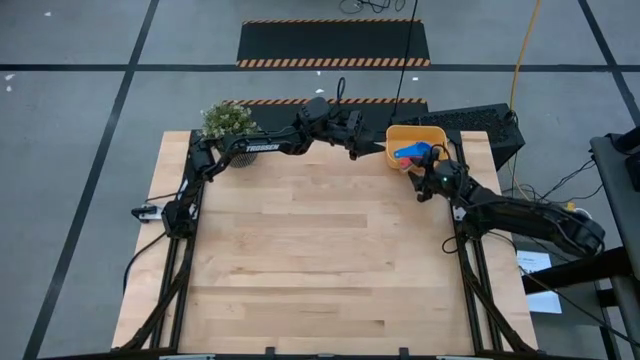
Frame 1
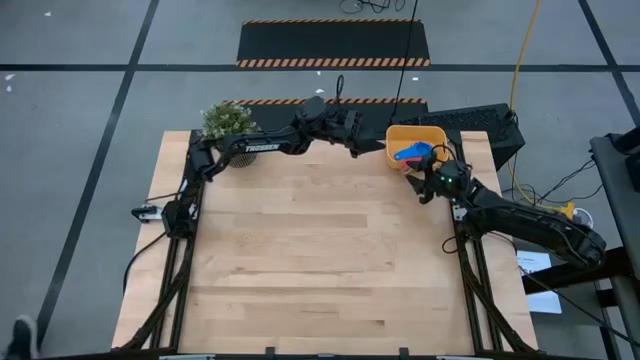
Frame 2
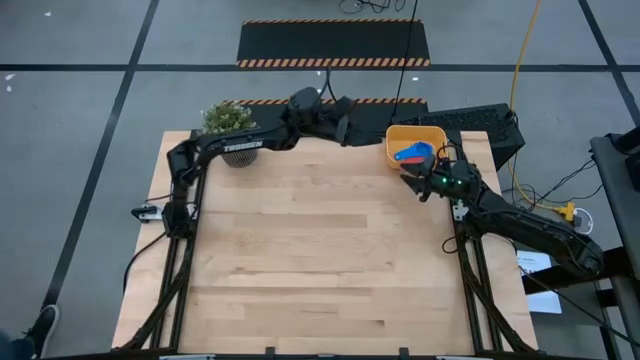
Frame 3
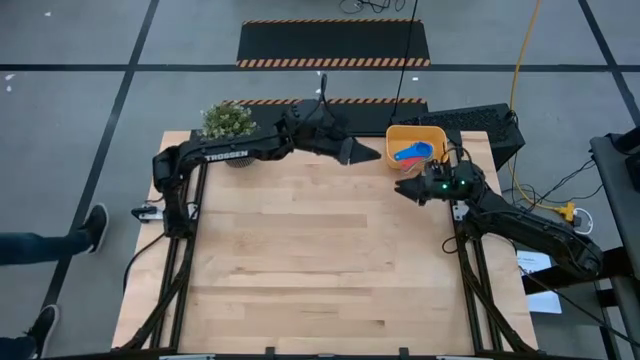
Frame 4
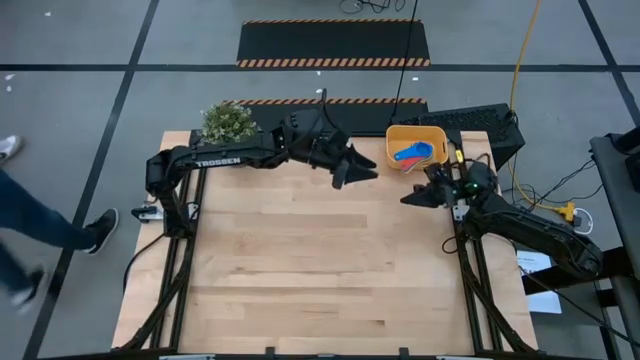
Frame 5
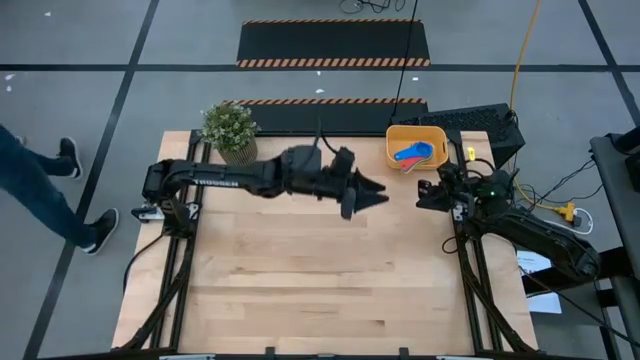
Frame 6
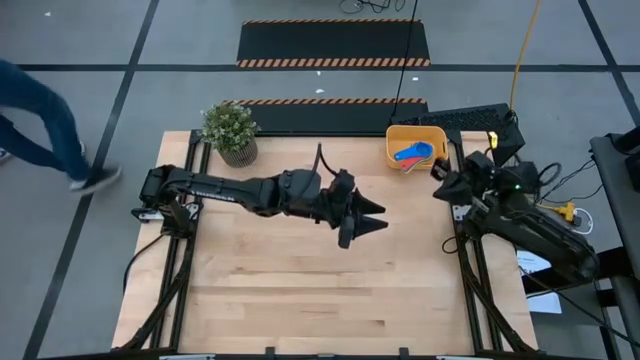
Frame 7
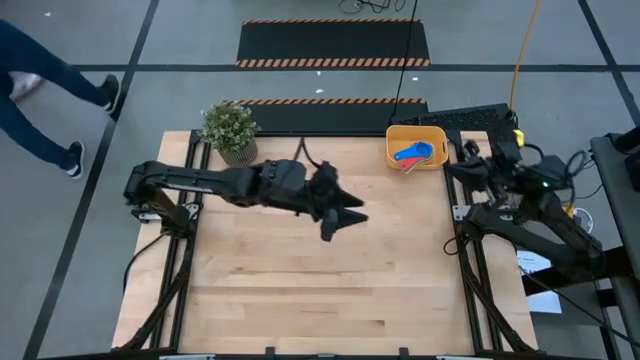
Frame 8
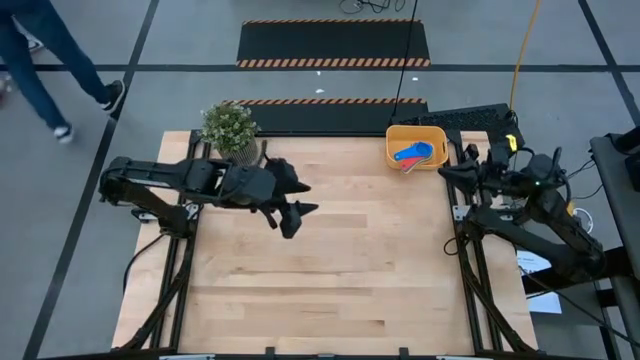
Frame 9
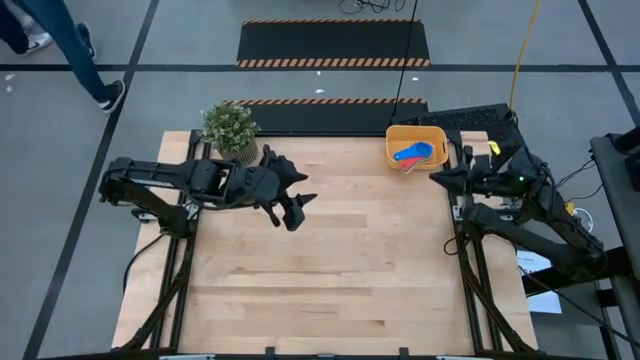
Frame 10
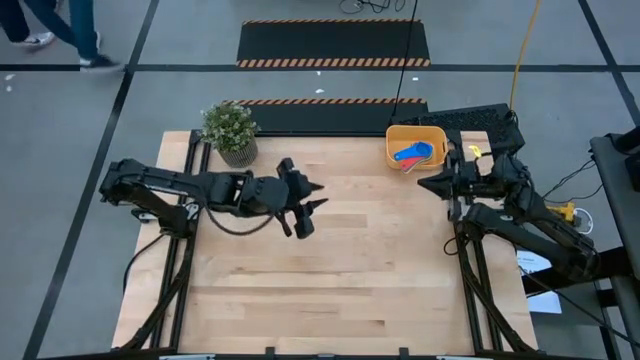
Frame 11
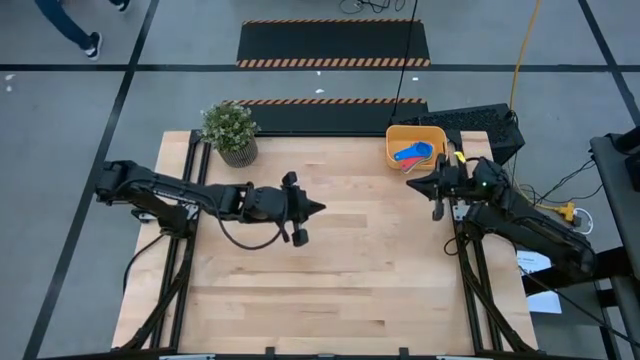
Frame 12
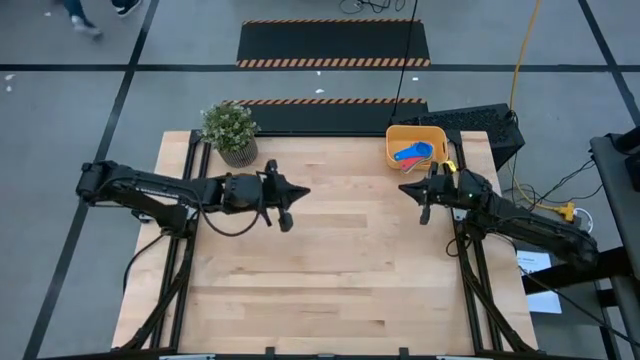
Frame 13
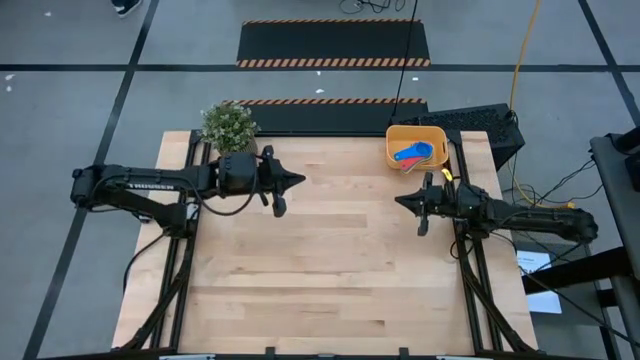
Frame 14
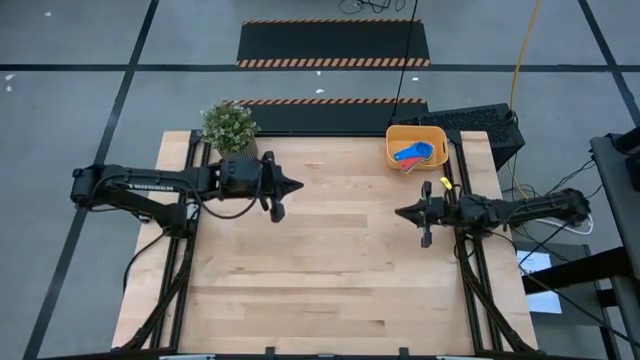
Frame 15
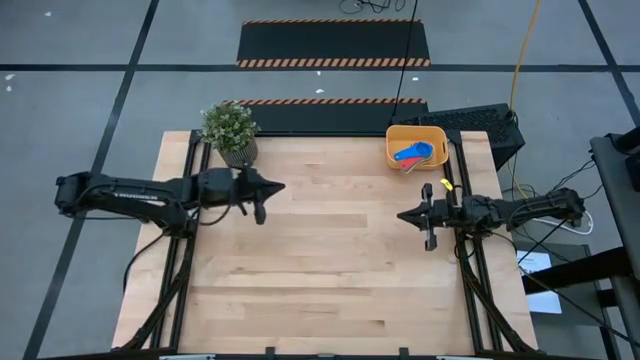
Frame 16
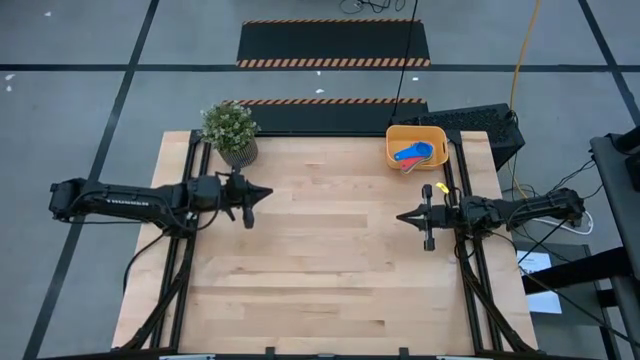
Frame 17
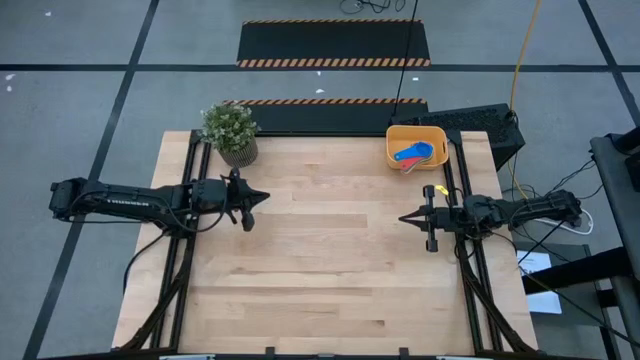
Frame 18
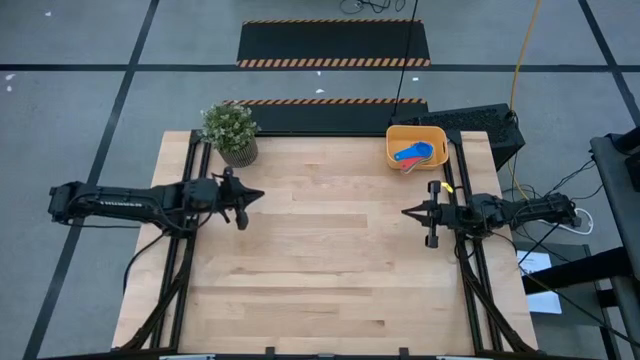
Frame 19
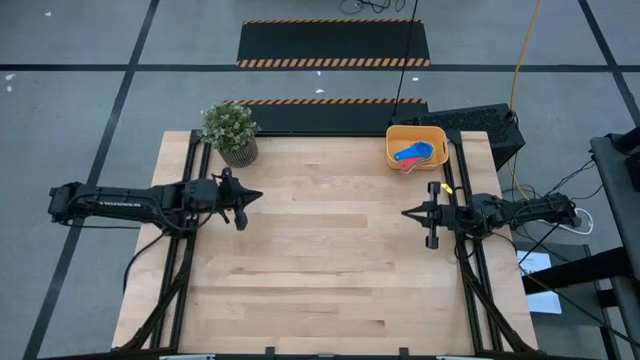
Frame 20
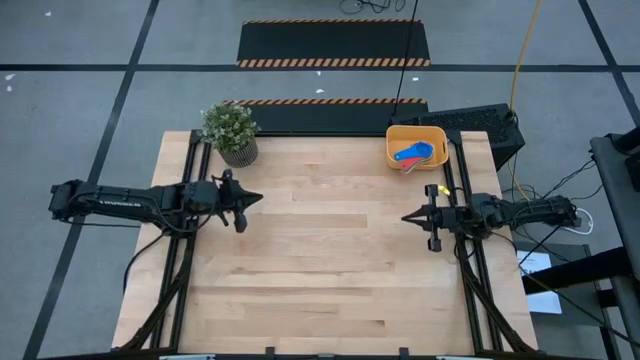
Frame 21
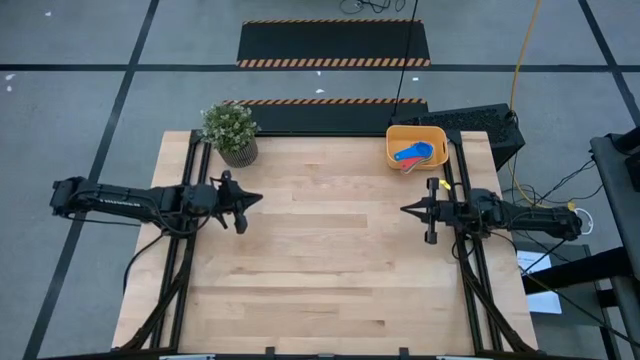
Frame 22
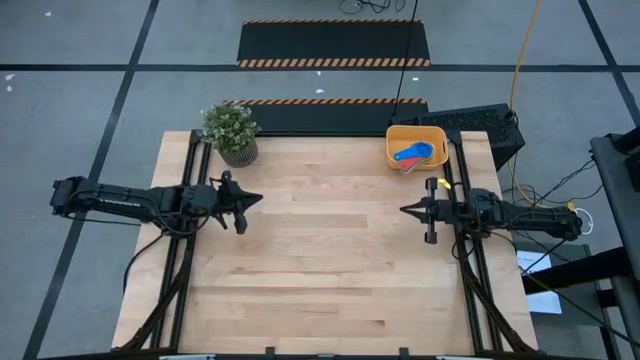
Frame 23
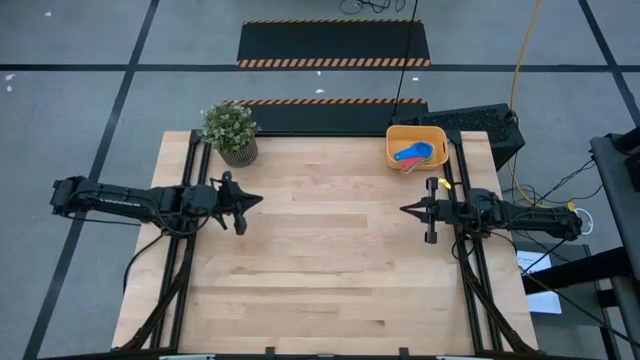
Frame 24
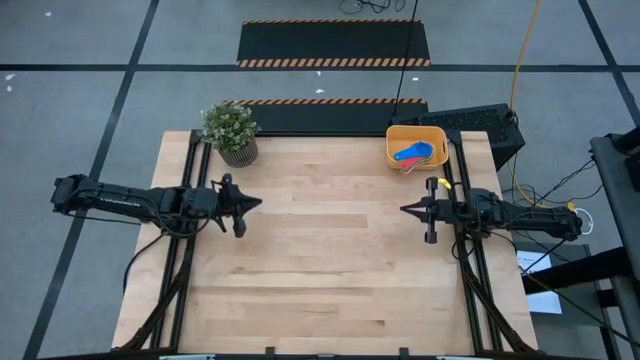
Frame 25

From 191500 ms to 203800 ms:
Task: Nest measuring cups in basket
Return to Home Position

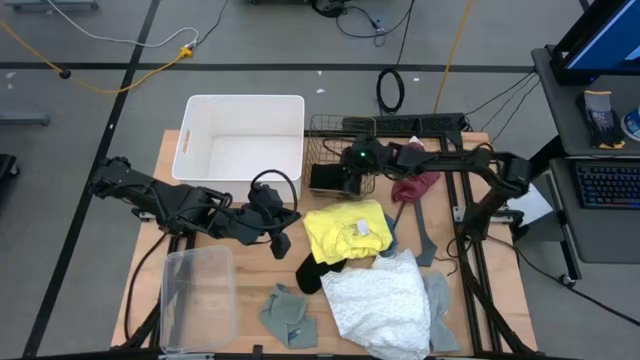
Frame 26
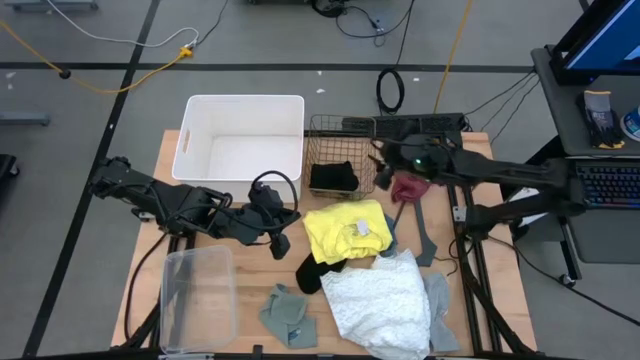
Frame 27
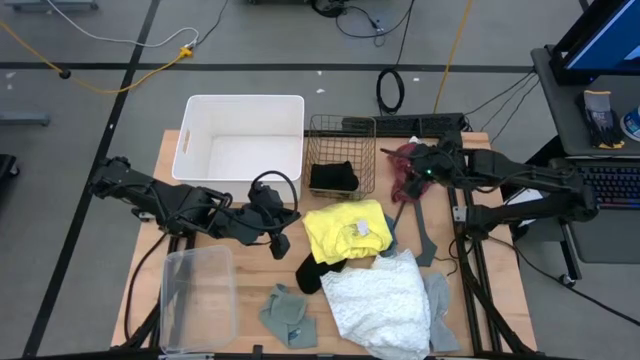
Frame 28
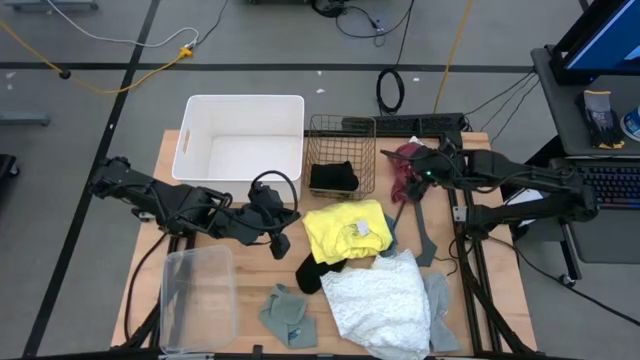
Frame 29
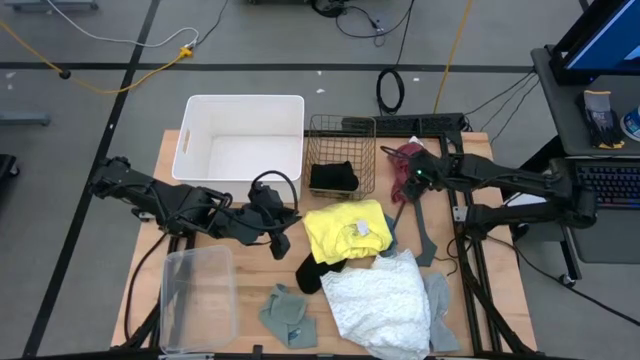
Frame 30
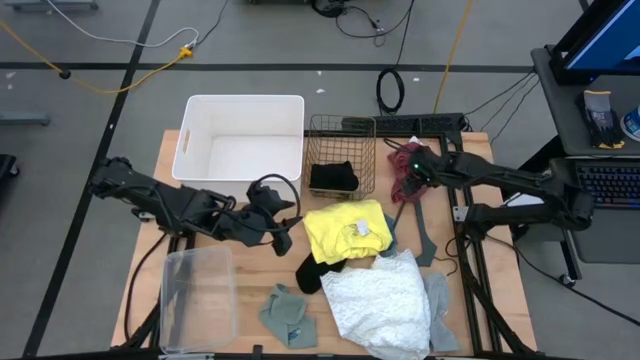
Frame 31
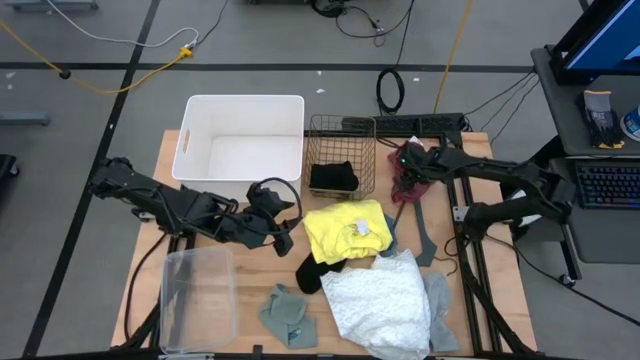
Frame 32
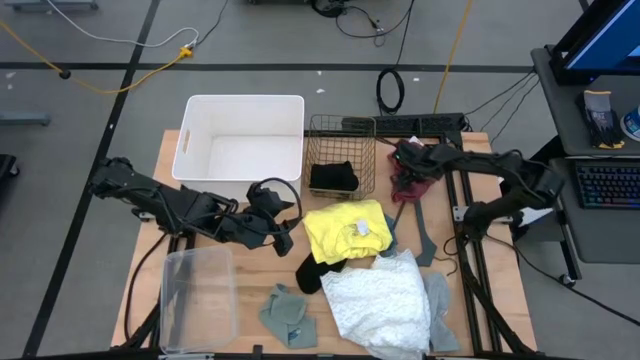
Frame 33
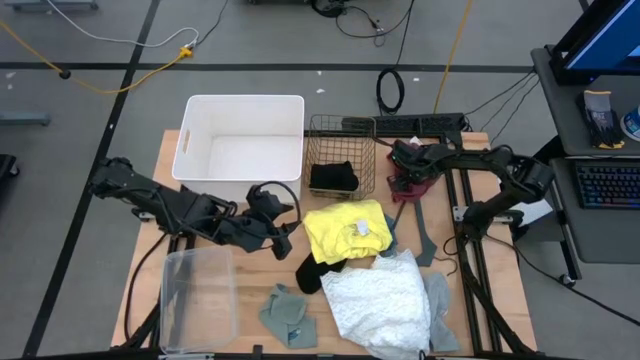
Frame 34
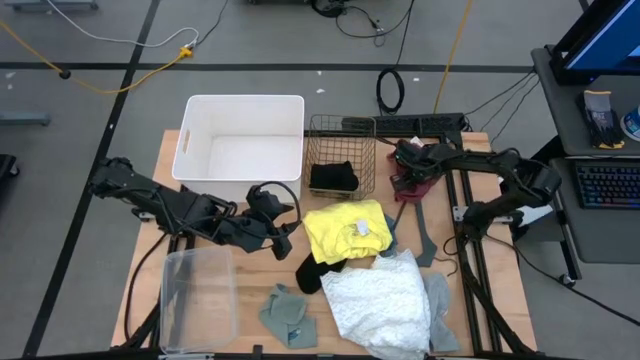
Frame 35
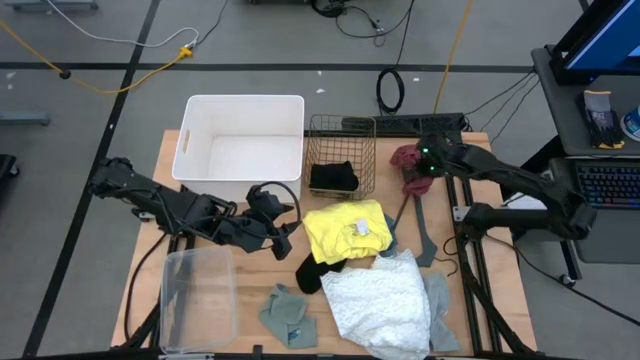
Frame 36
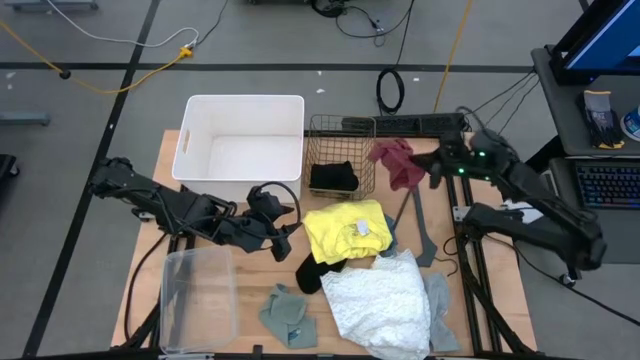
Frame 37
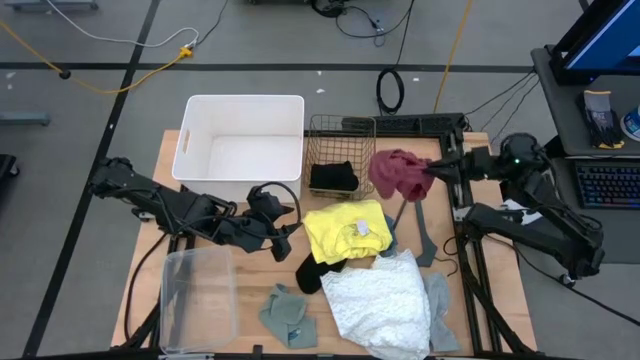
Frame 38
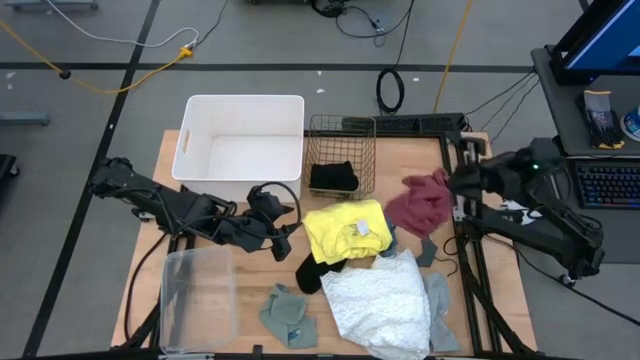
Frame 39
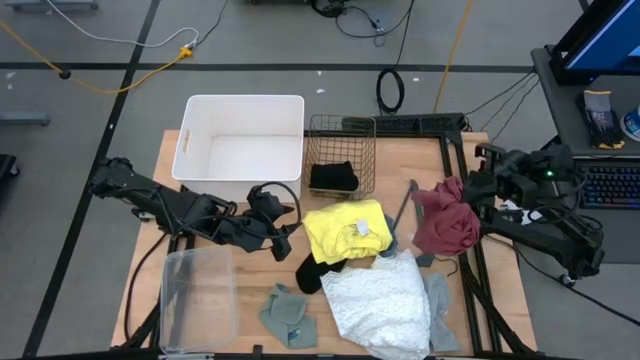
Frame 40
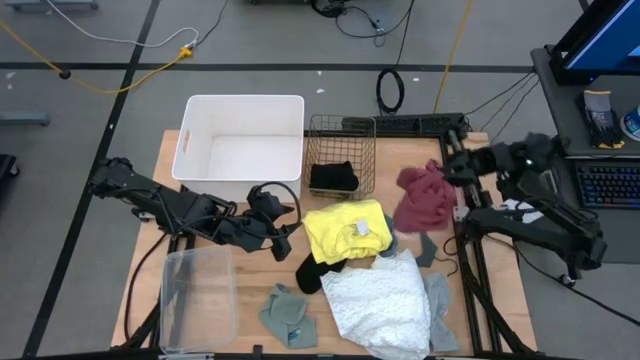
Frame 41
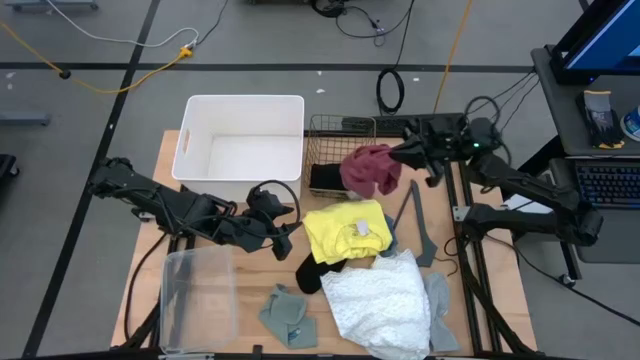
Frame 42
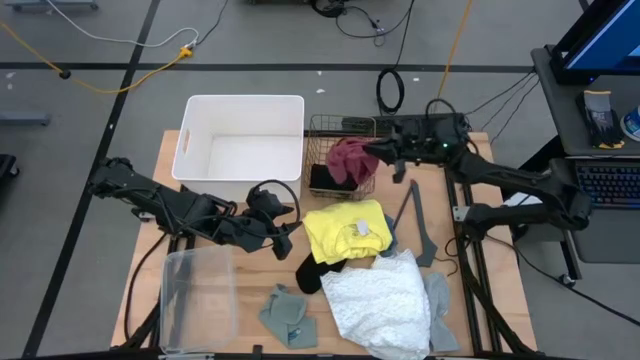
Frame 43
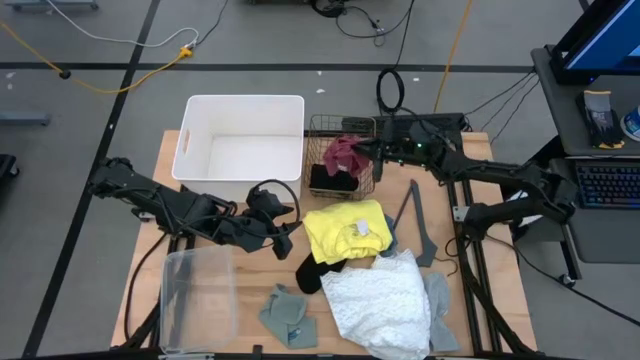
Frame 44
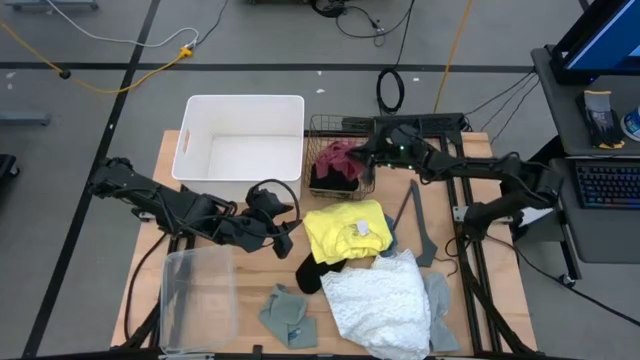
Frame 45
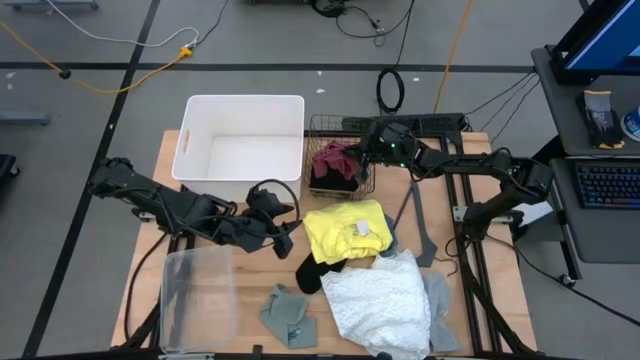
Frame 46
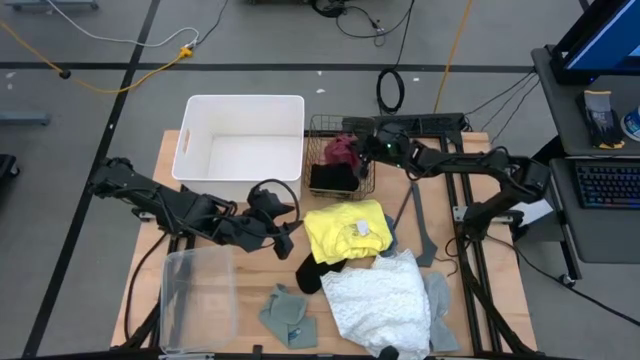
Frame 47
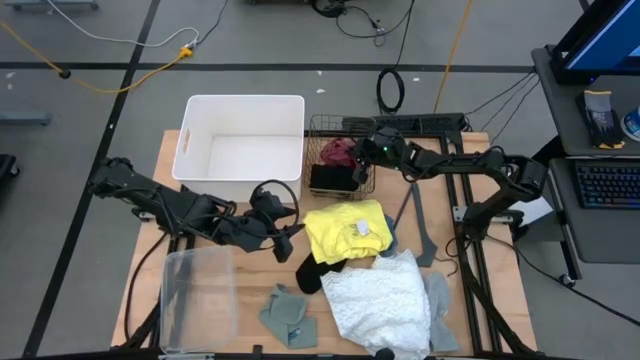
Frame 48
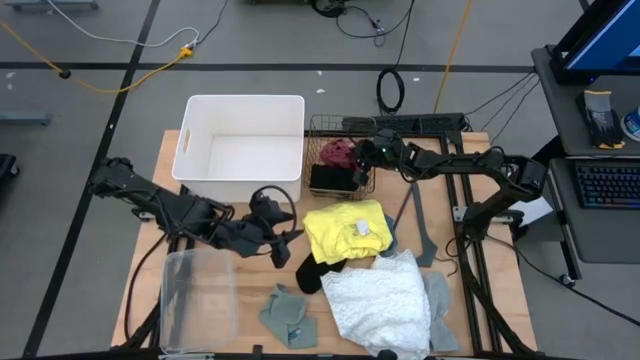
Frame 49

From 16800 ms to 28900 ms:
Task: Pick & Place Cloths
Put the dark pink pants into the wire basket
